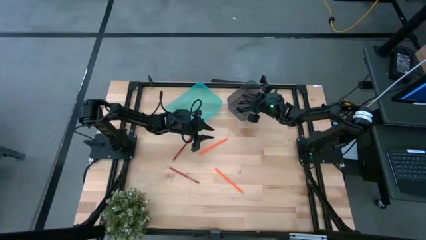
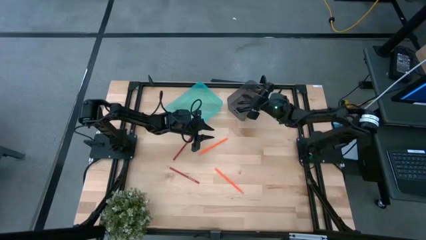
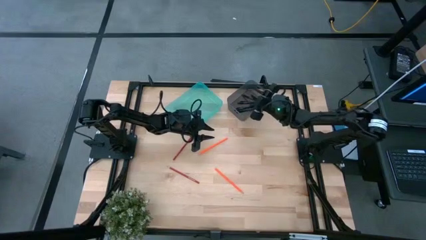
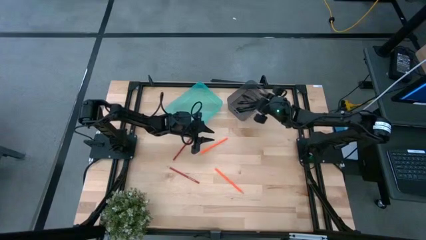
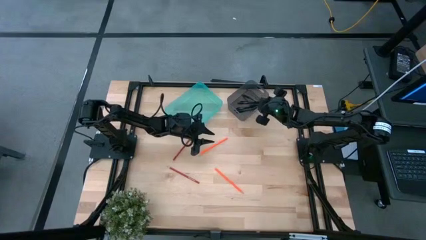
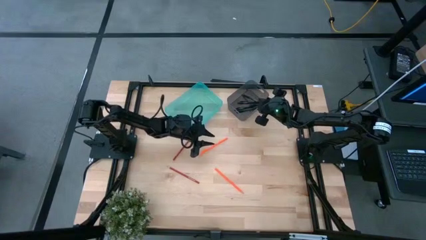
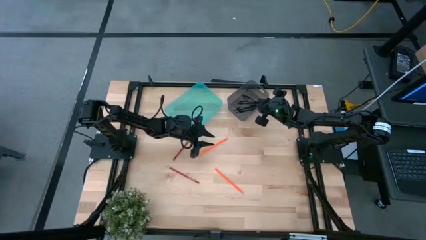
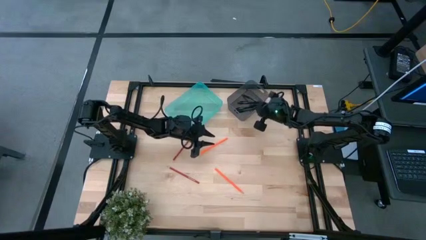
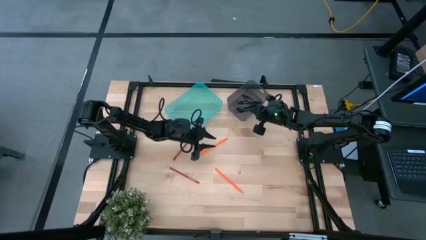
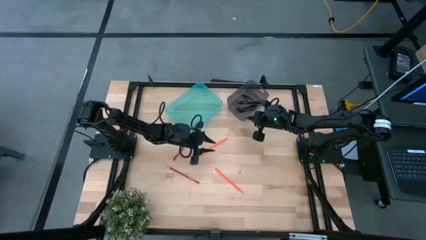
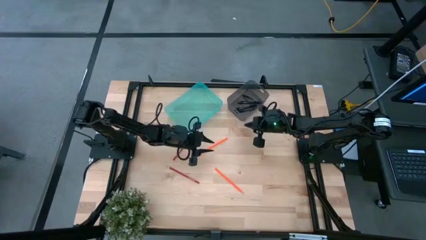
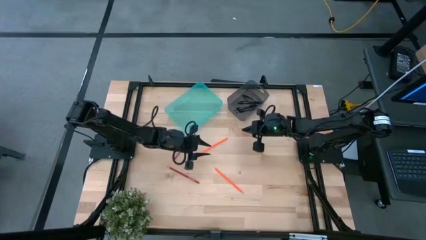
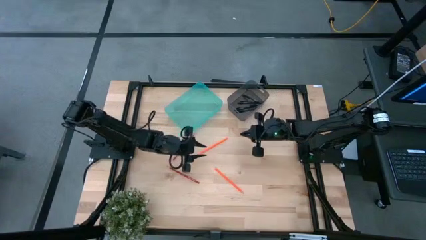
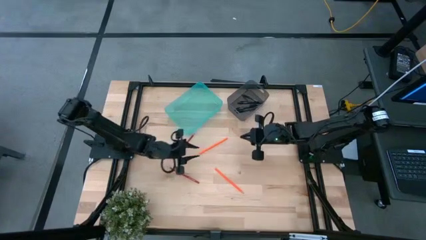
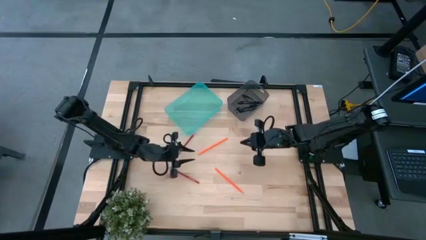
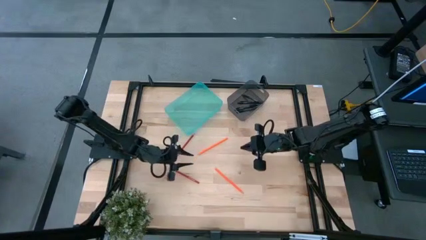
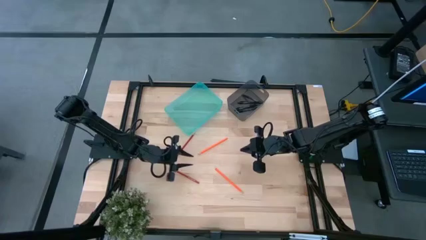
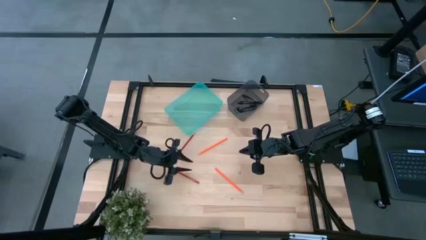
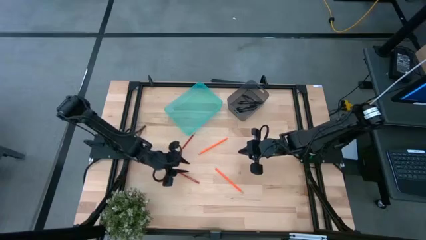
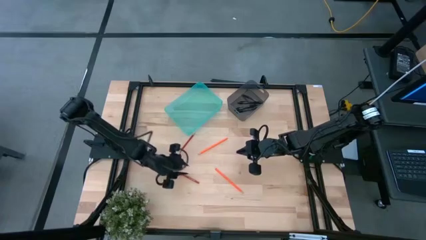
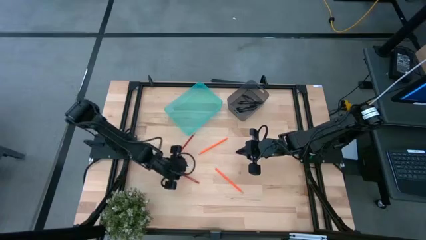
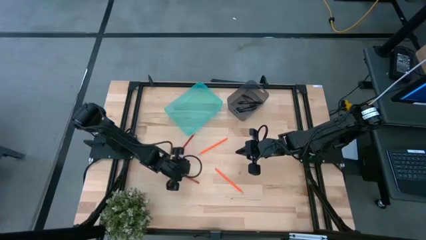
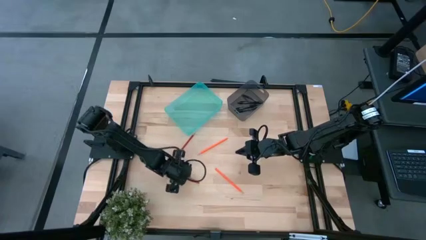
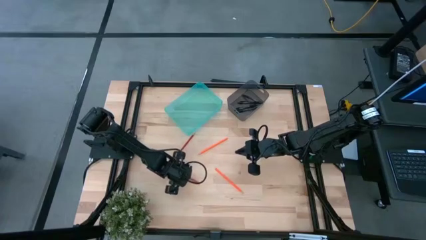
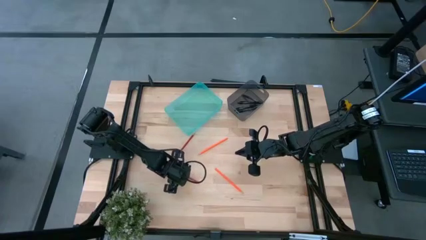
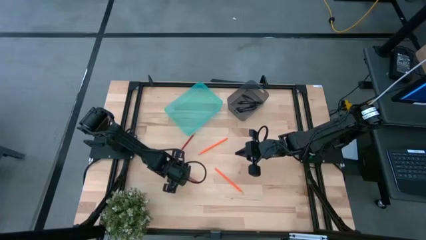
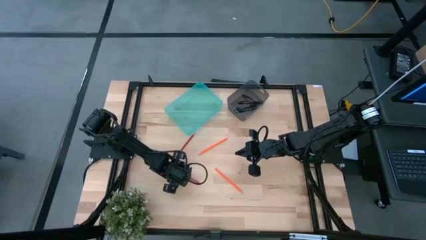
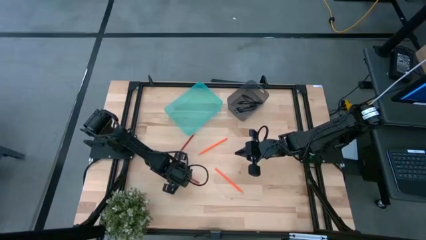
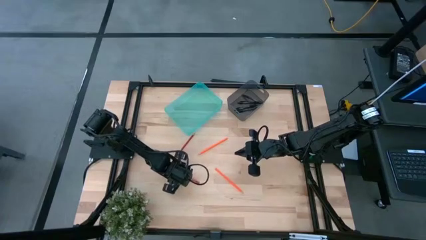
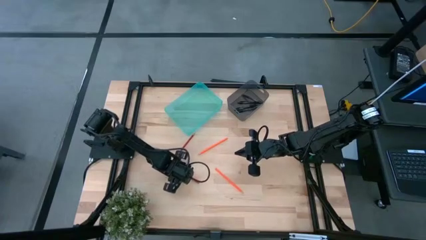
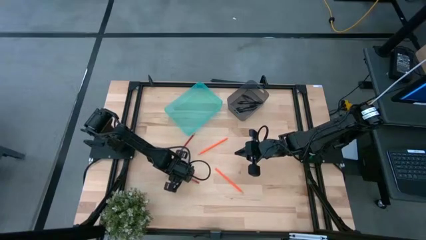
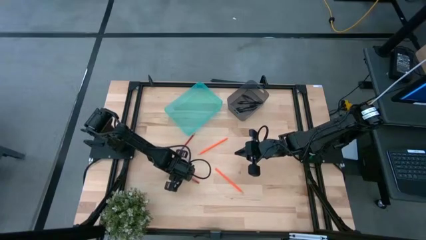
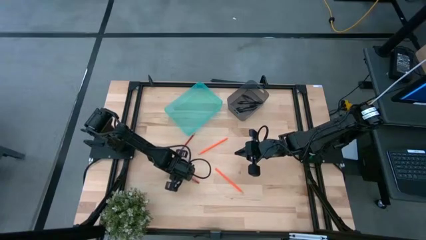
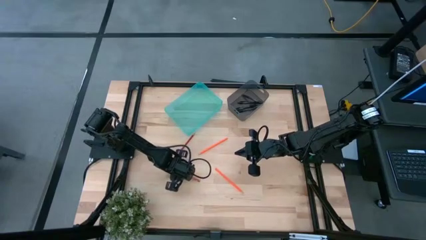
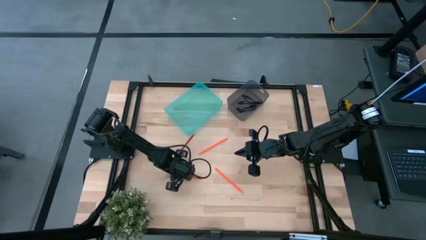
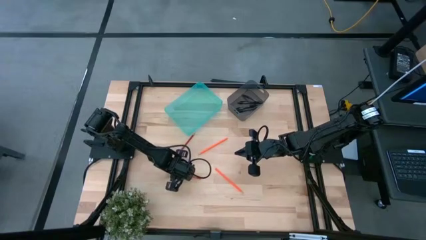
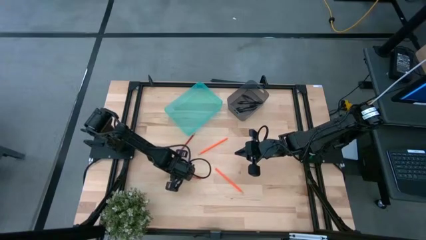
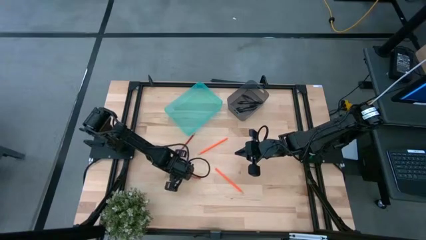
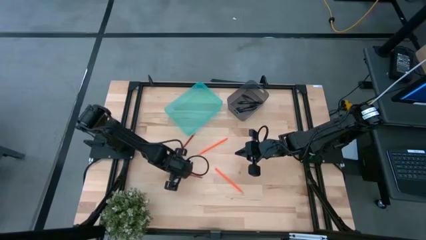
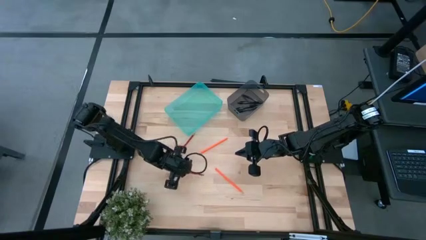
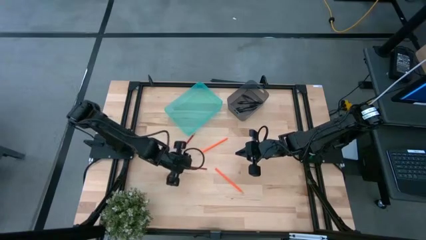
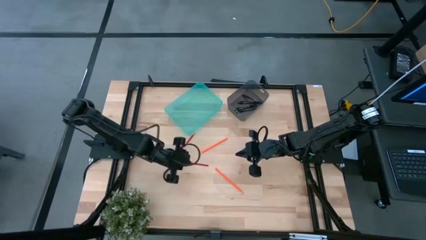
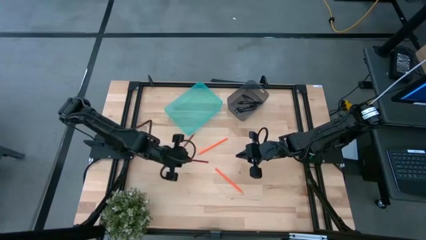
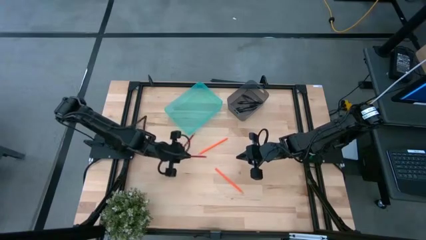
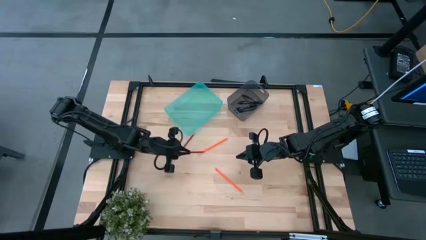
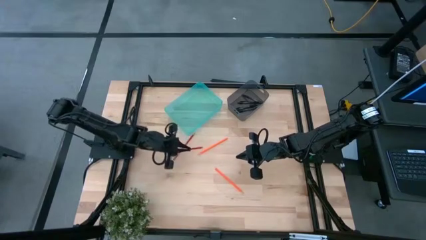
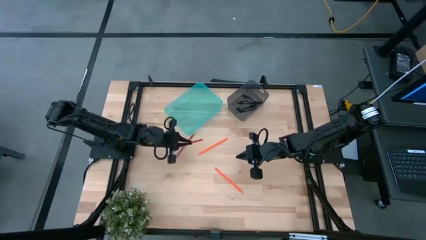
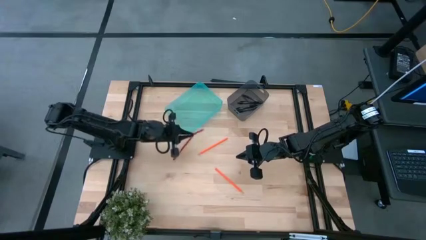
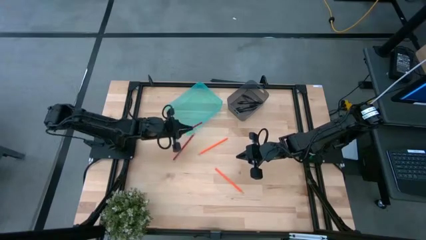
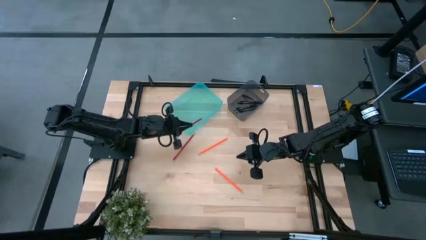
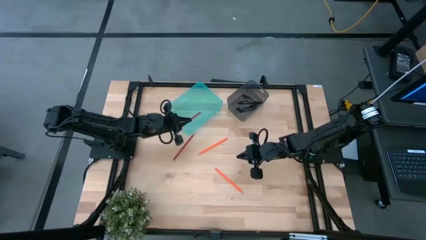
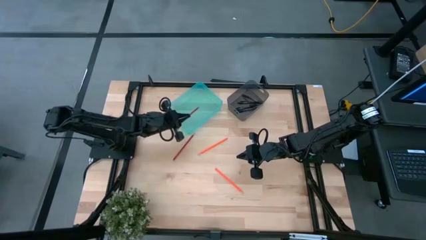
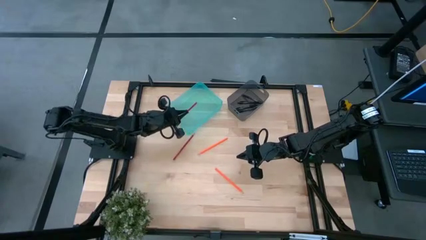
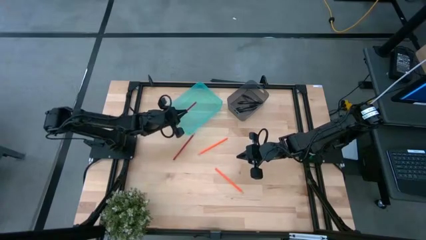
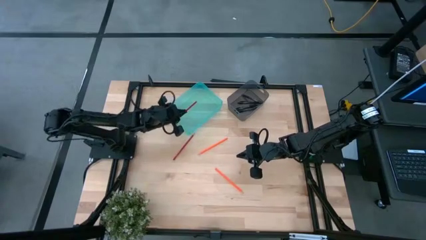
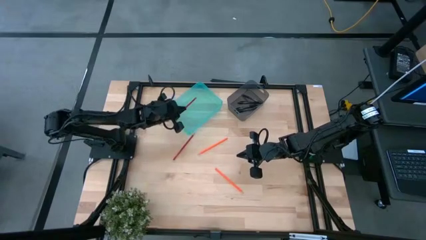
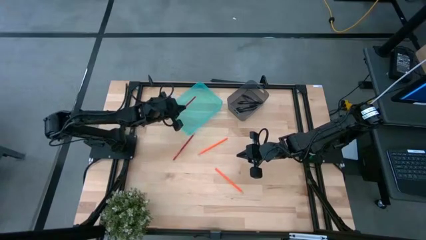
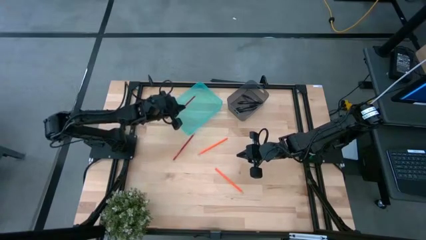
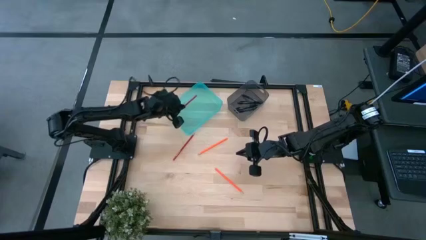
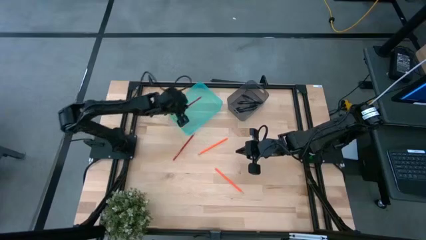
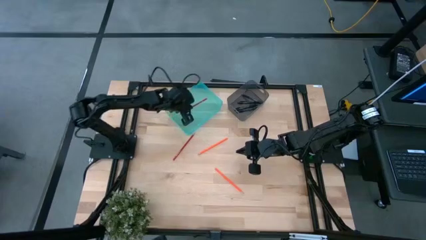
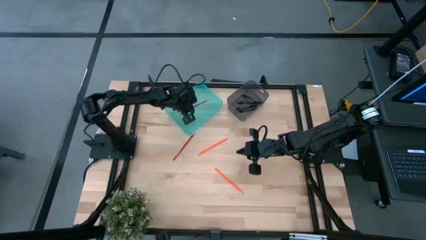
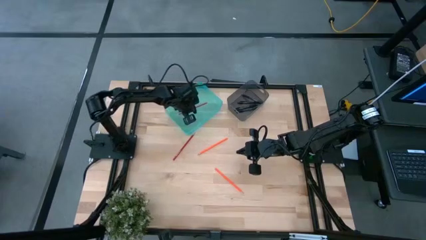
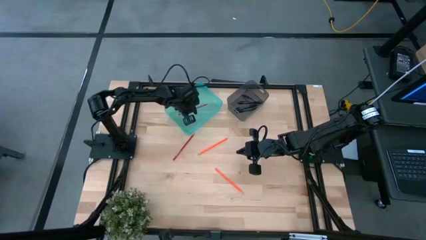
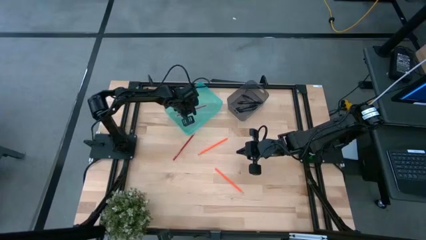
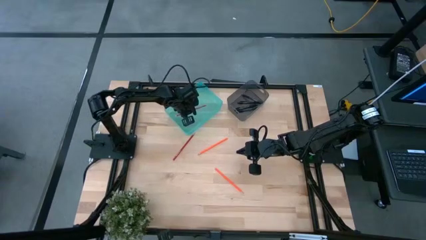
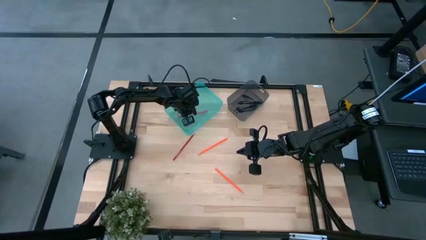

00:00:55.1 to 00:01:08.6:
Task: Sort pens & pencils
Put the bottom red pencil into the green bin

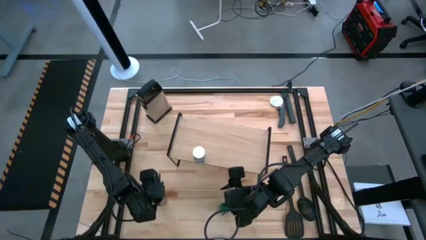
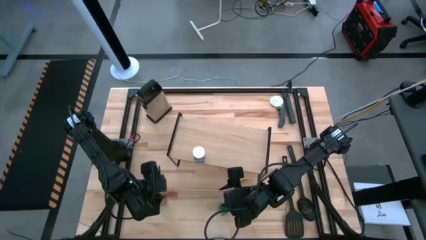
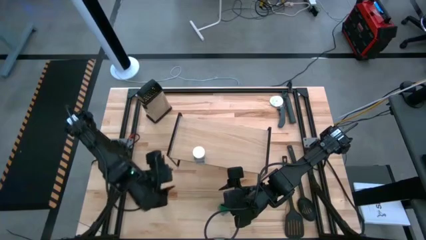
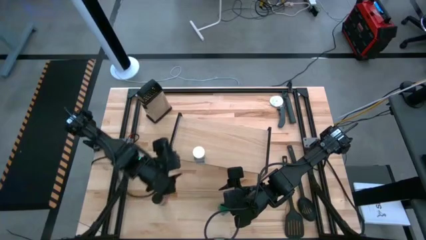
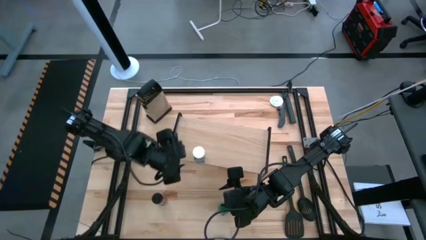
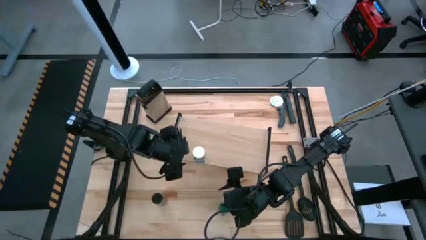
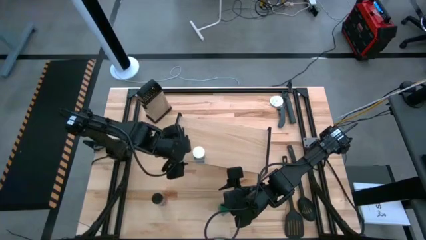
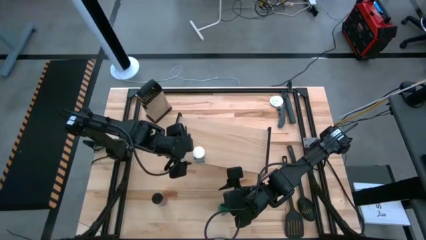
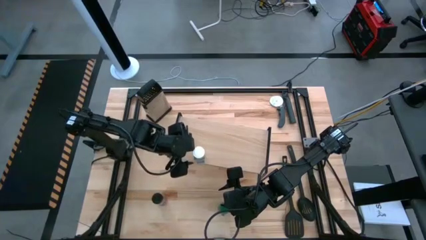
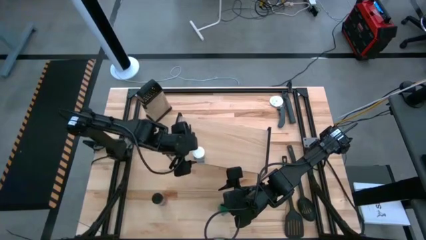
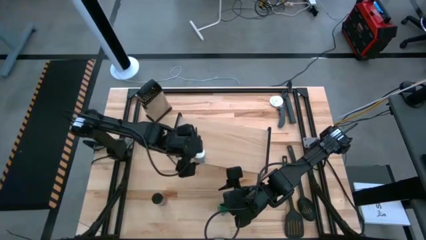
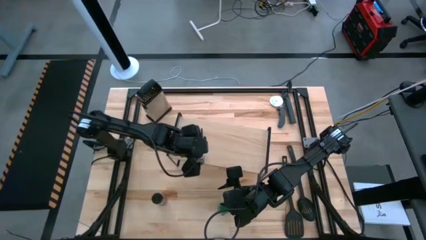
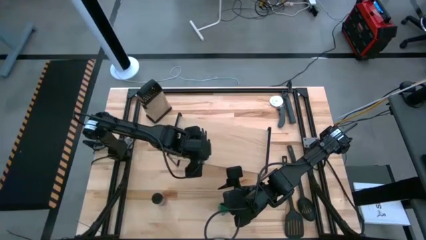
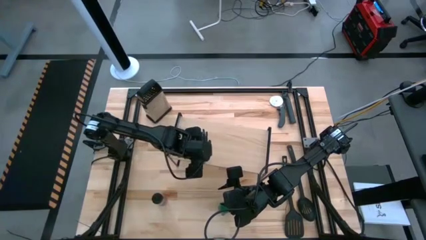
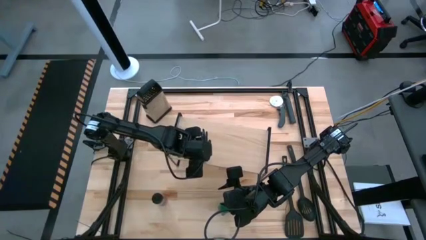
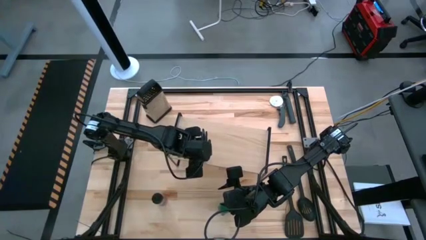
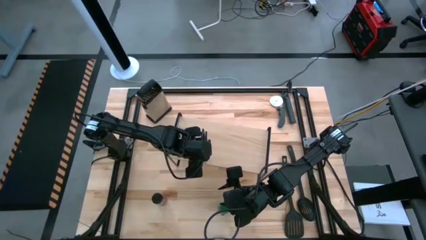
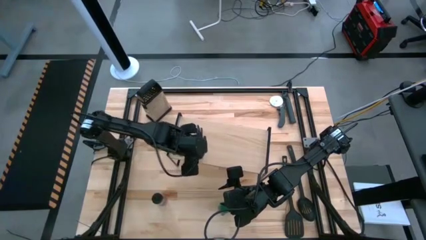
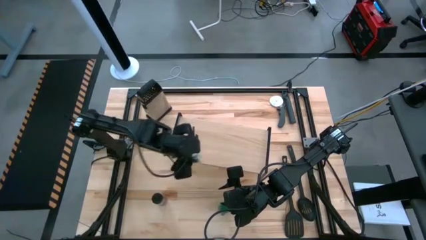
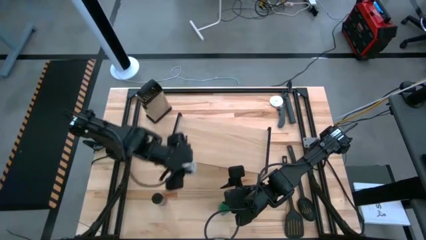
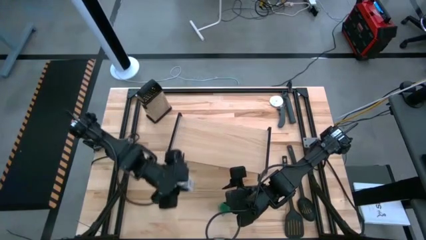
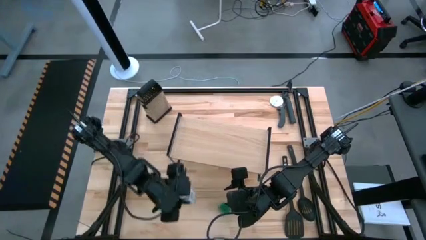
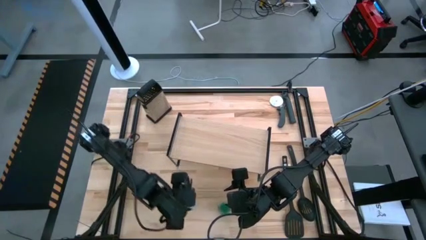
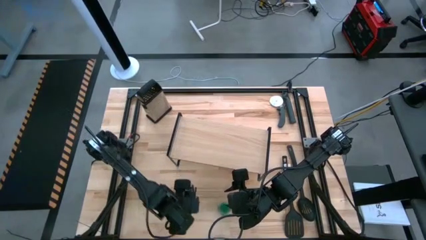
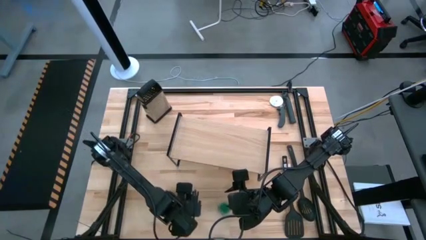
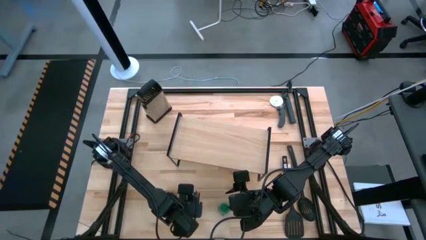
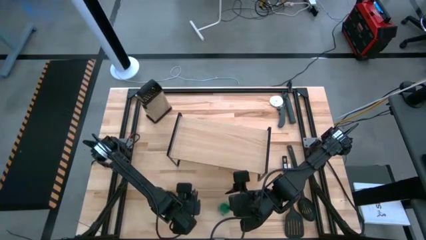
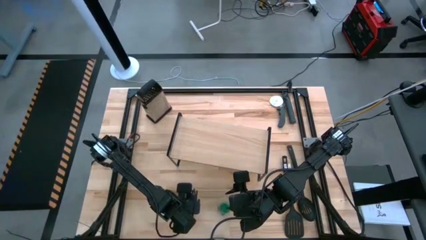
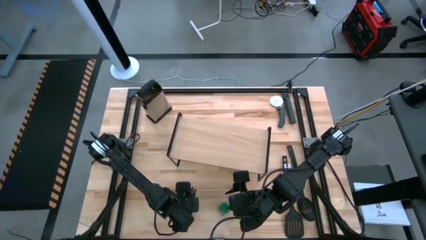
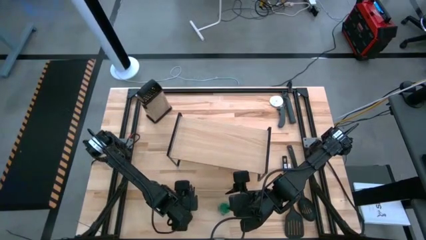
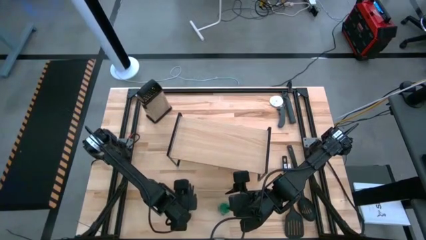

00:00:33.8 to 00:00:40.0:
Task: Shelf spices
Remove the white seasoning bottle from the shelf
